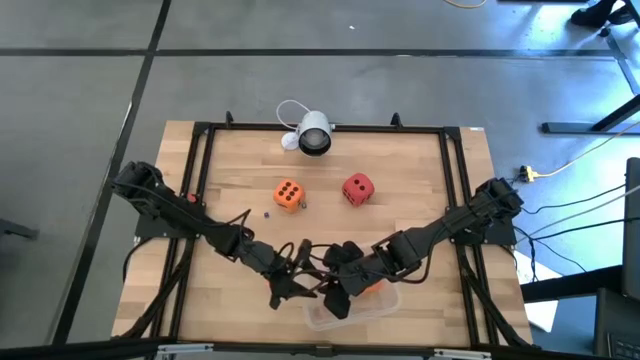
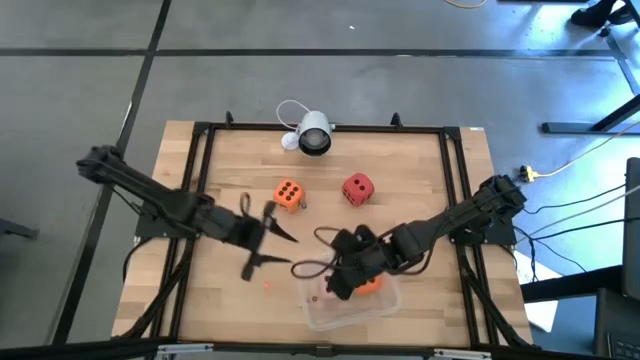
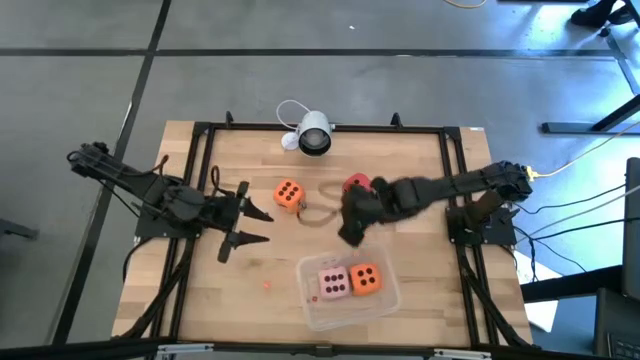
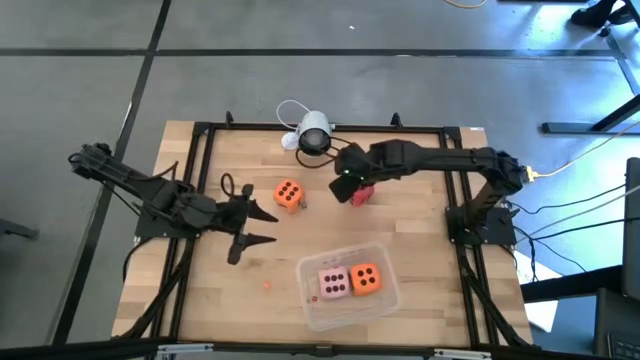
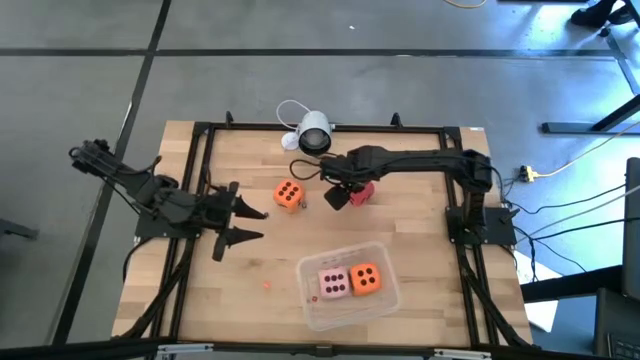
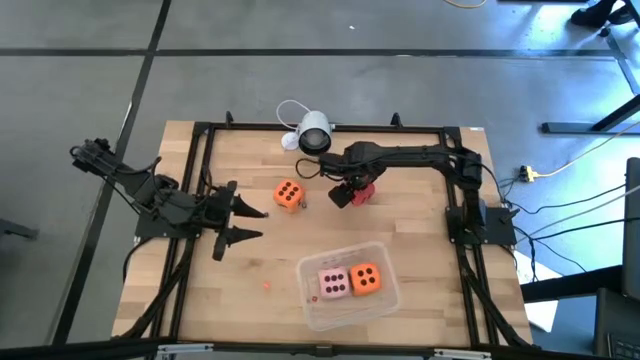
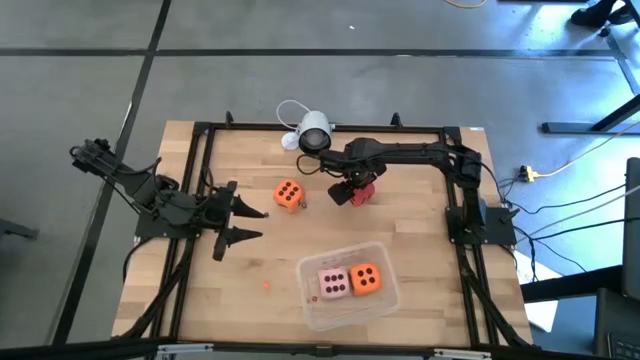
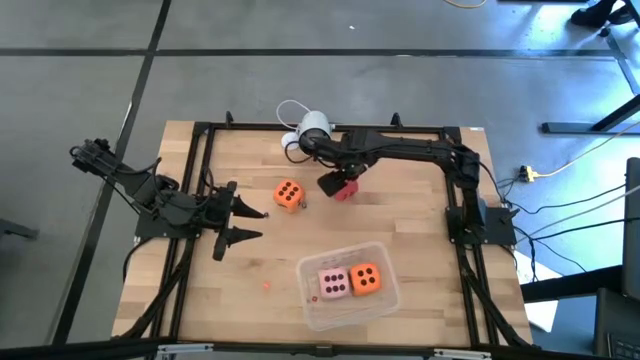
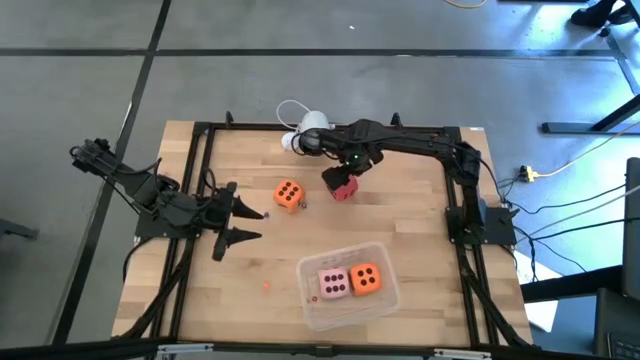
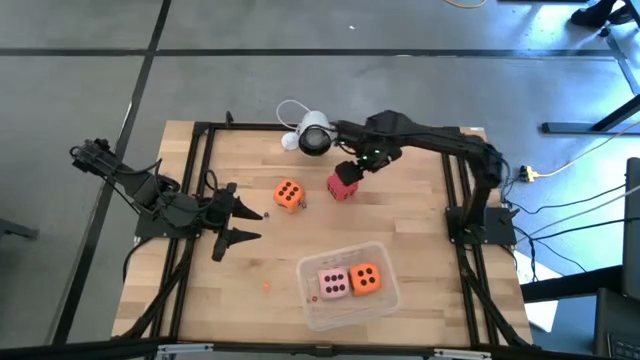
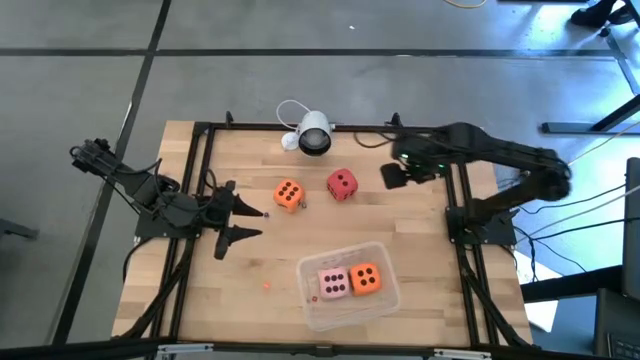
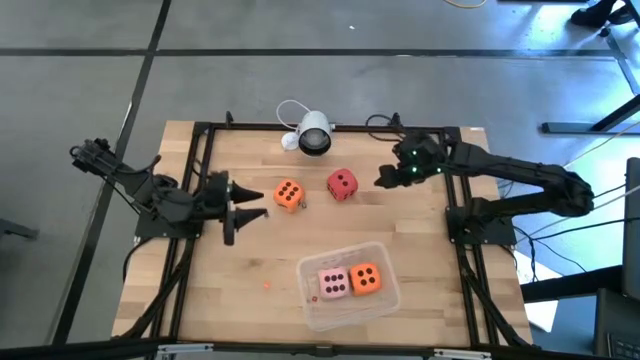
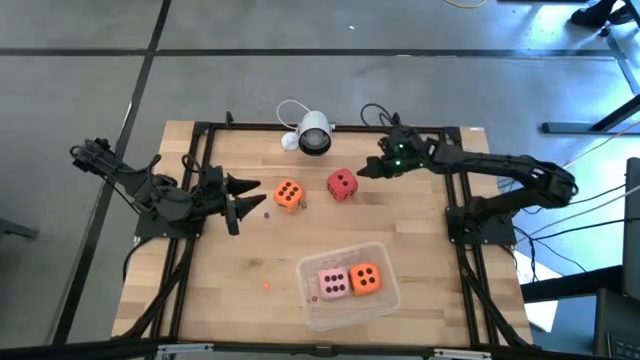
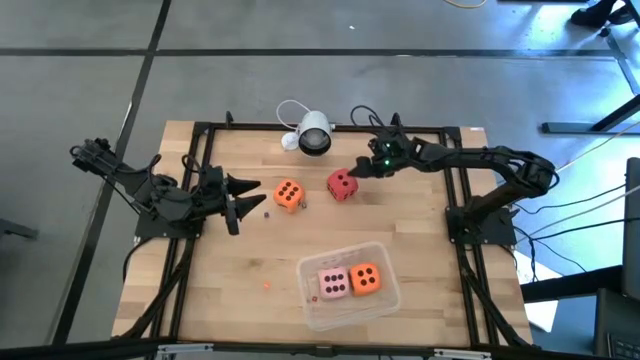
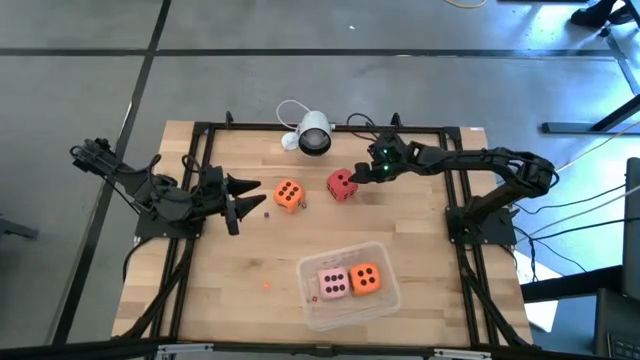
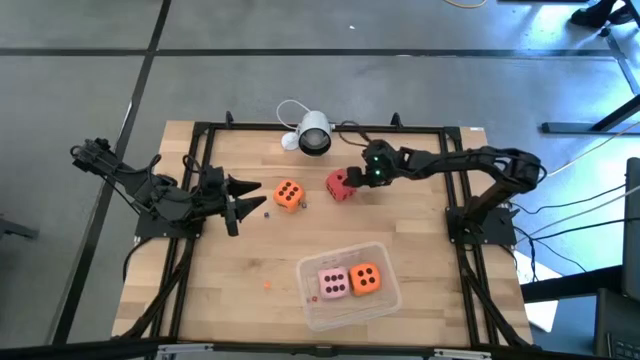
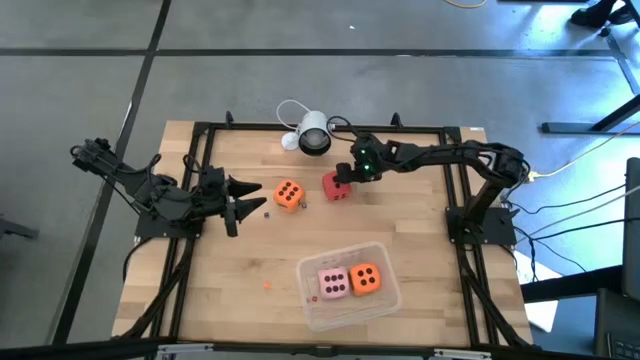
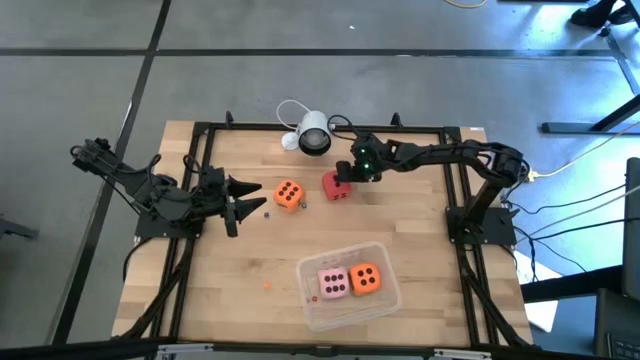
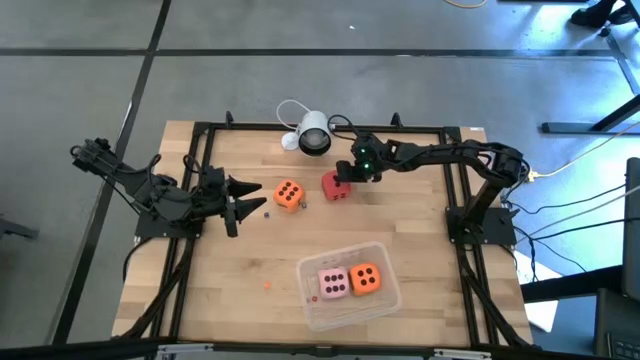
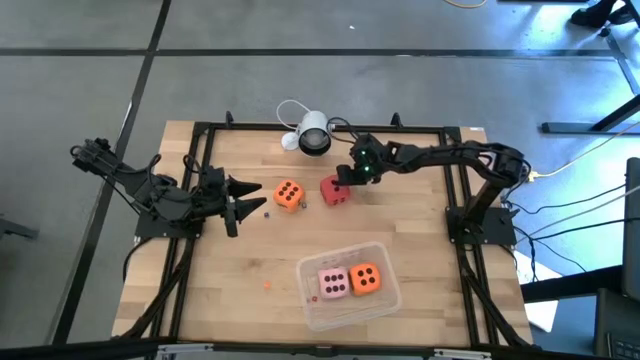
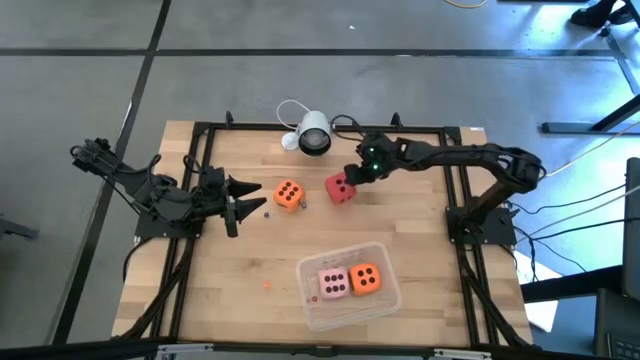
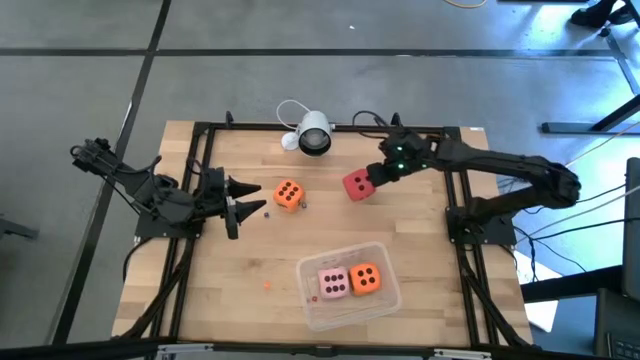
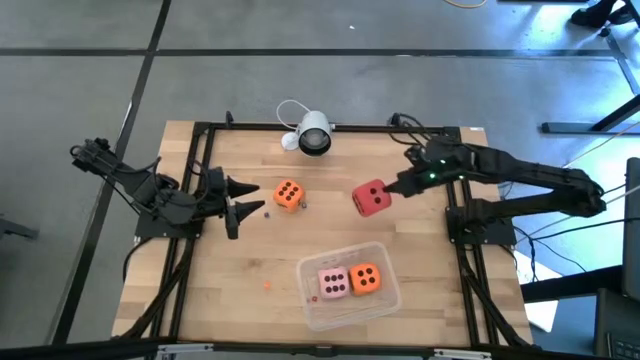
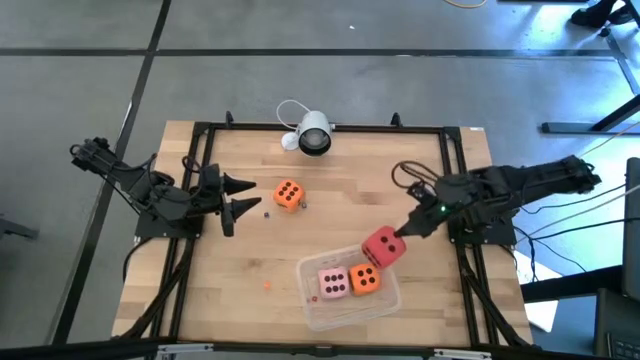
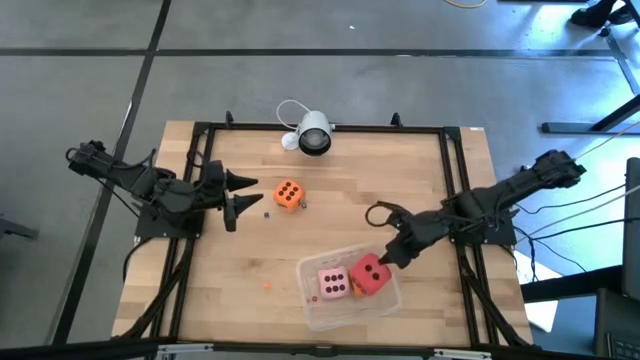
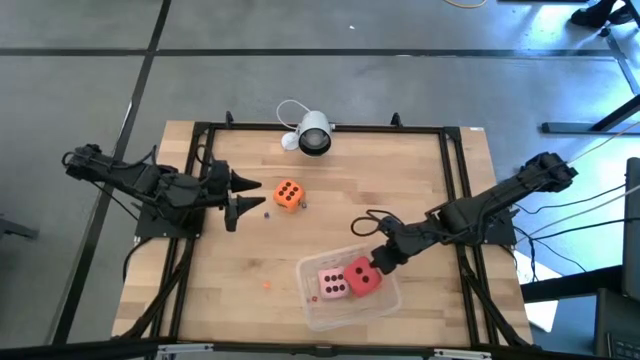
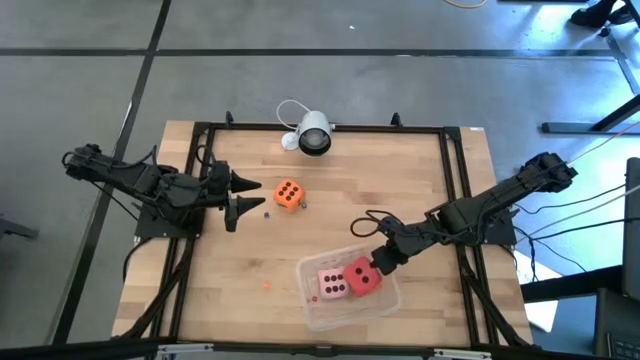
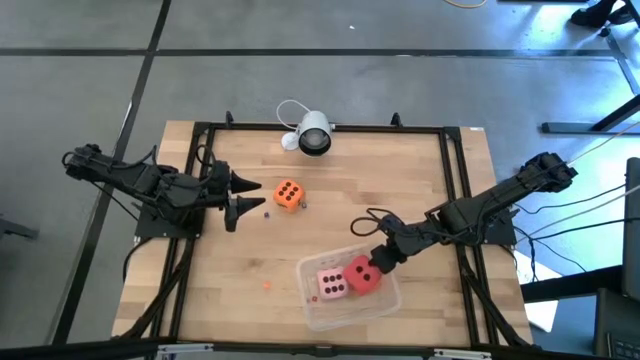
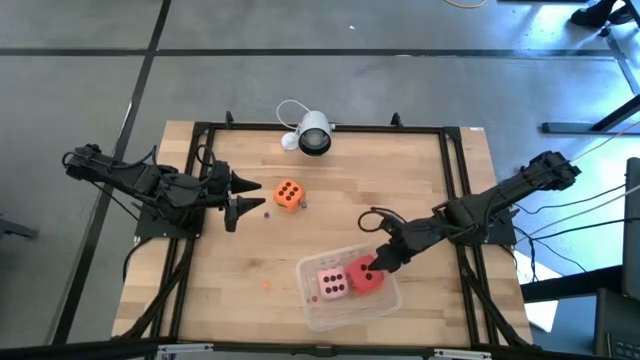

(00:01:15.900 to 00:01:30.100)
Task: Pick & Place Dice
Put the large red die into the transparent bin

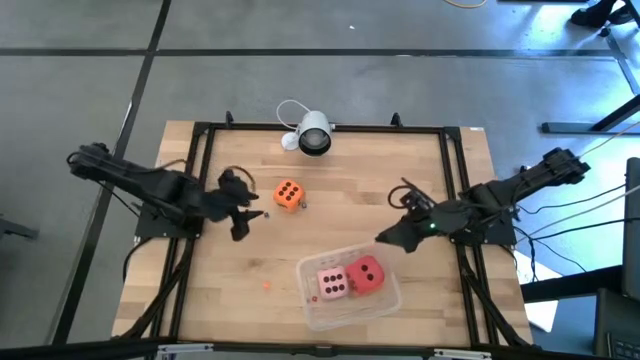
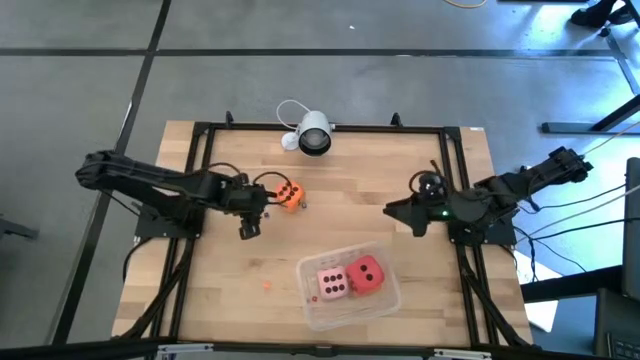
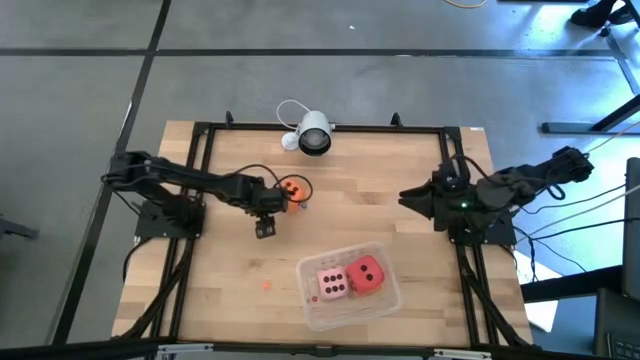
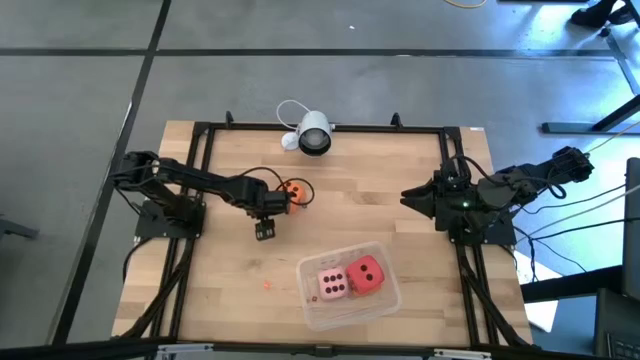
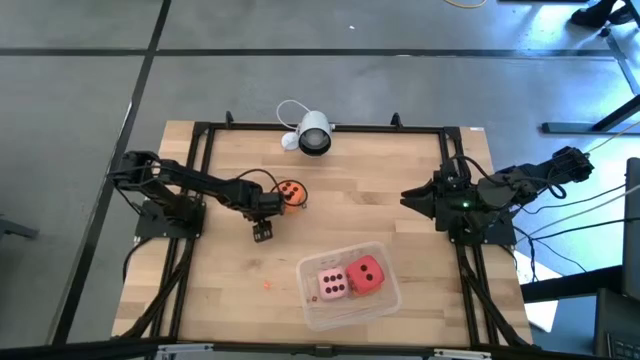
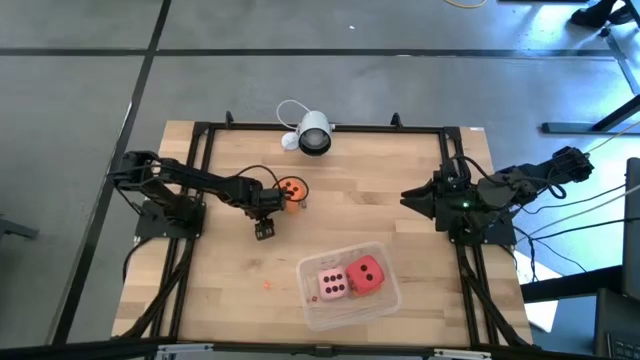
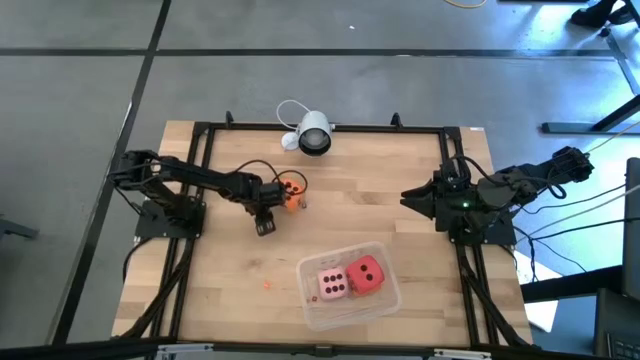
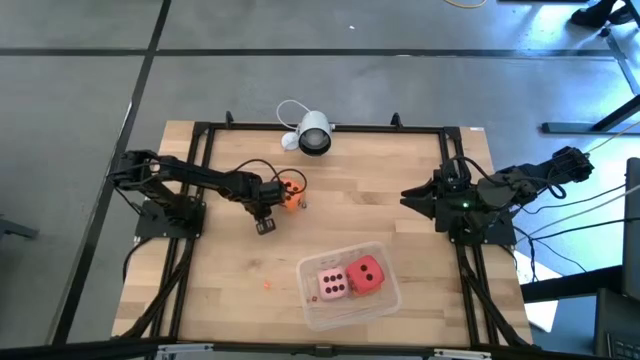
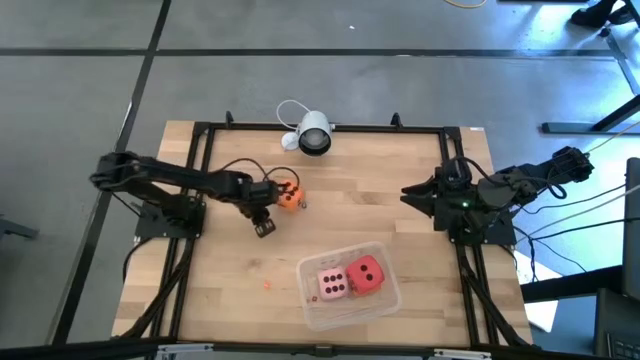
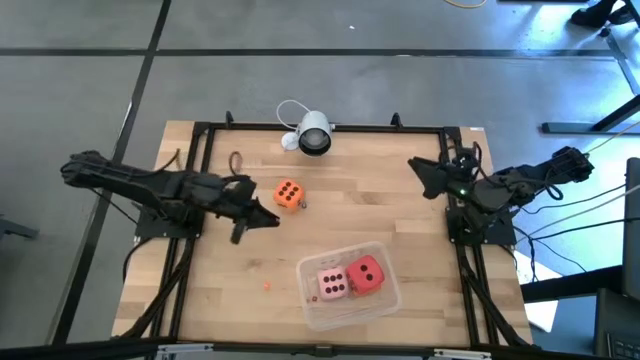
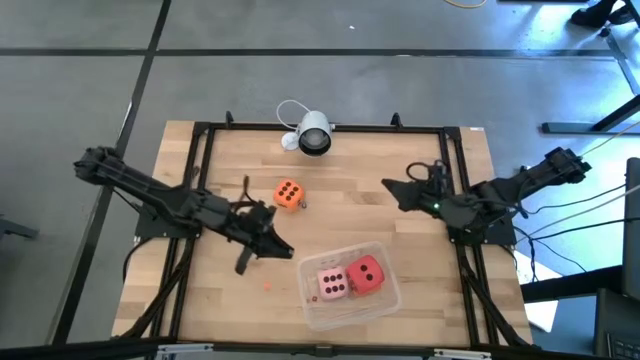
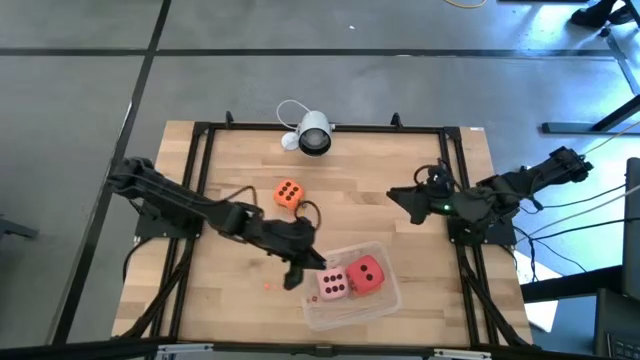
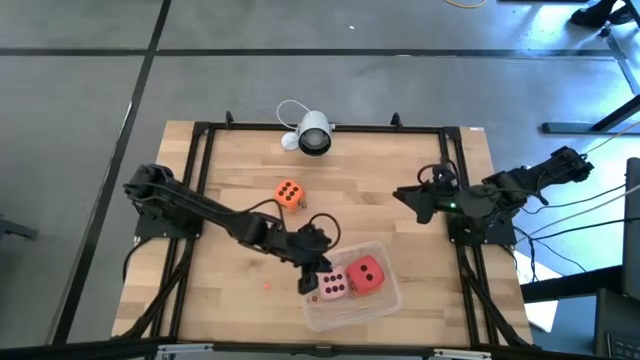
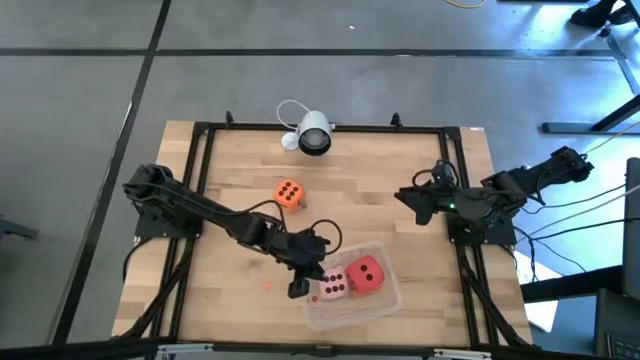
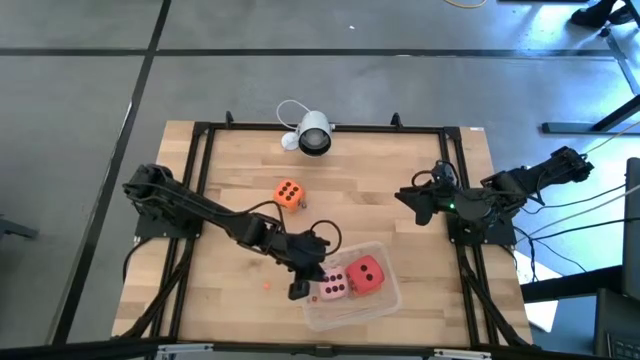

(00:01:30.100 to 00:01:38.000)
Put the bottom small blue die into the transparent bin
